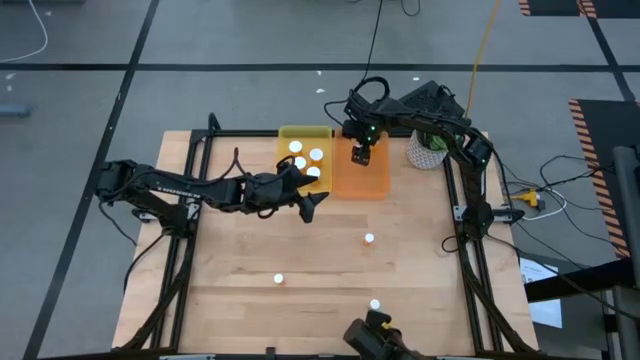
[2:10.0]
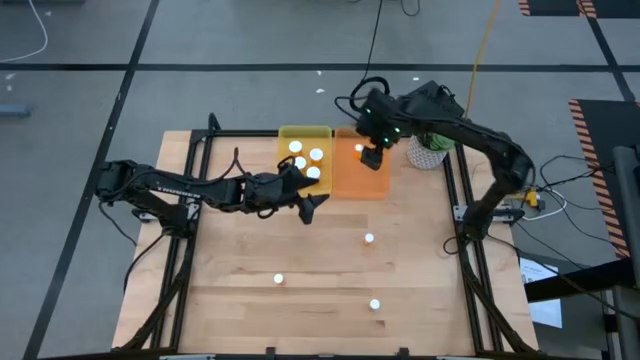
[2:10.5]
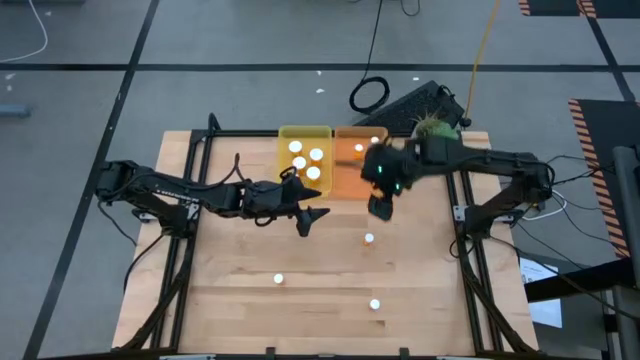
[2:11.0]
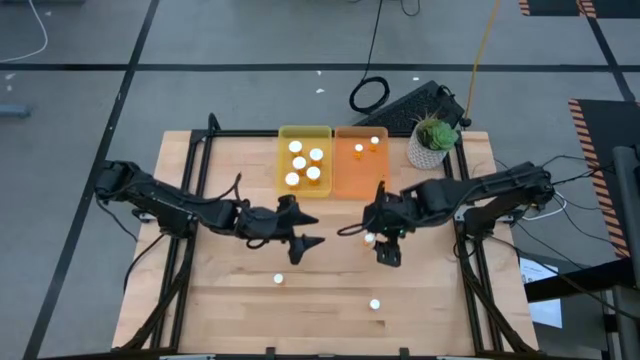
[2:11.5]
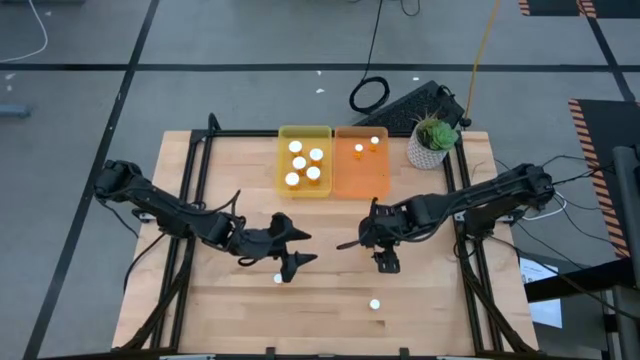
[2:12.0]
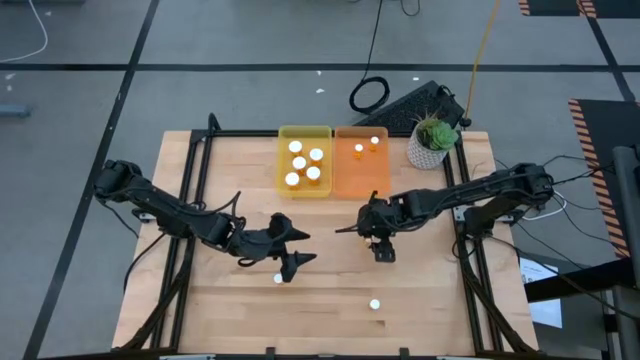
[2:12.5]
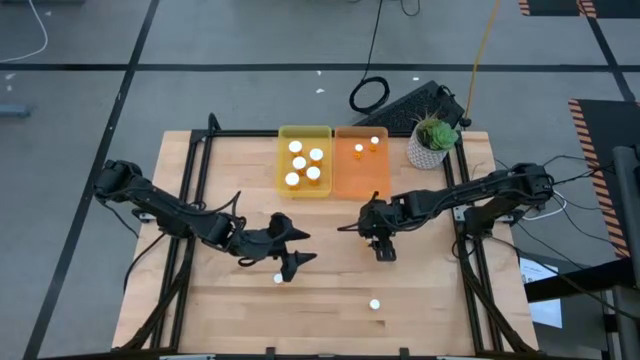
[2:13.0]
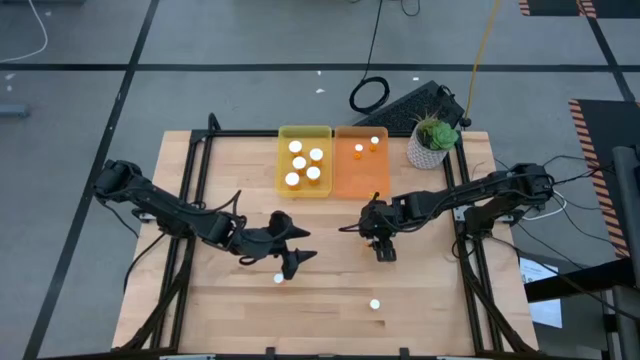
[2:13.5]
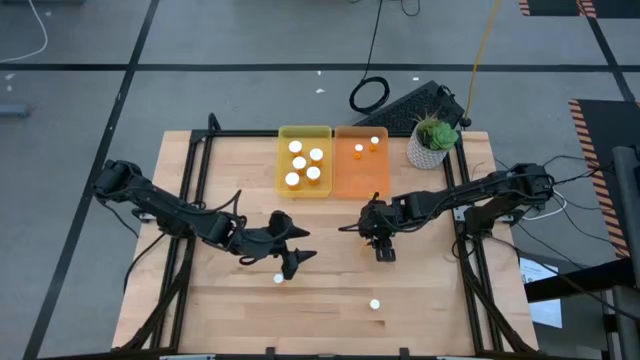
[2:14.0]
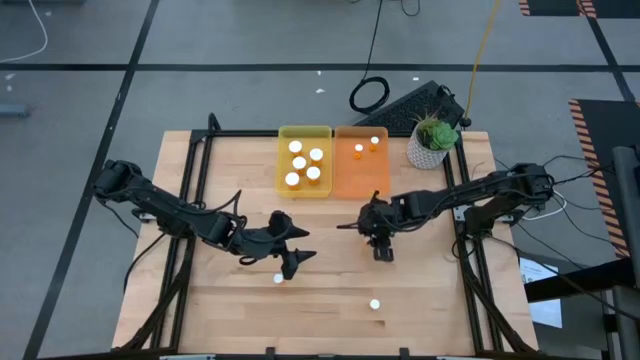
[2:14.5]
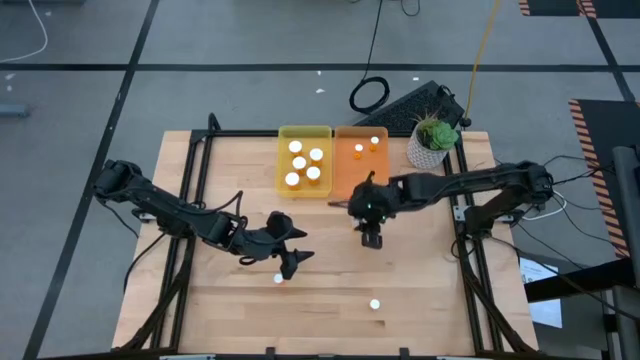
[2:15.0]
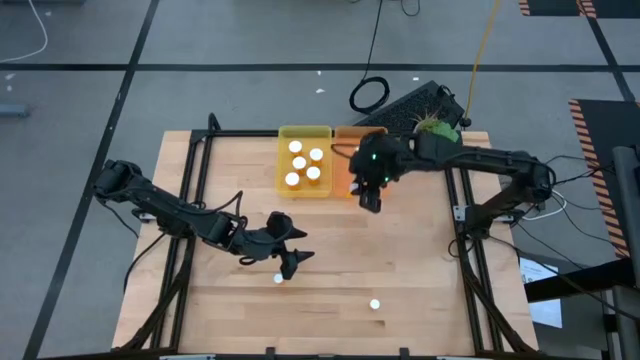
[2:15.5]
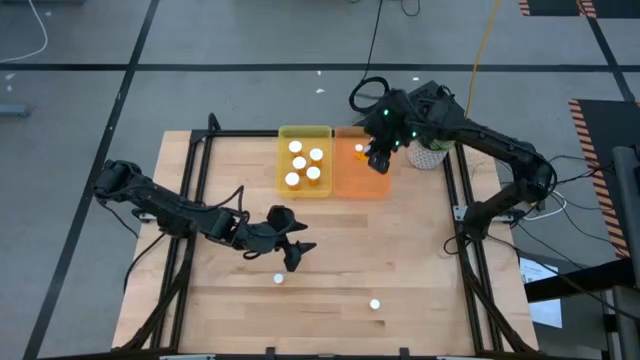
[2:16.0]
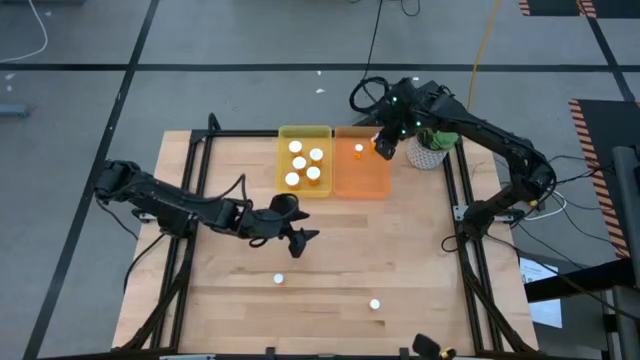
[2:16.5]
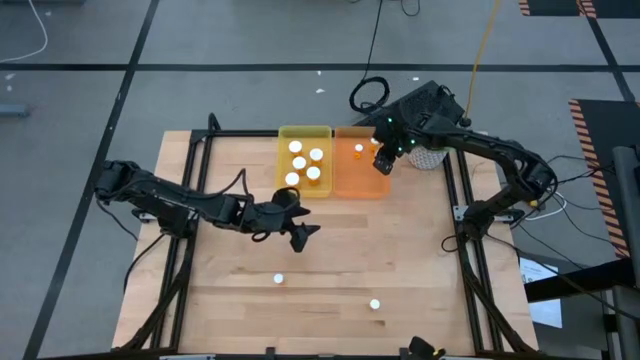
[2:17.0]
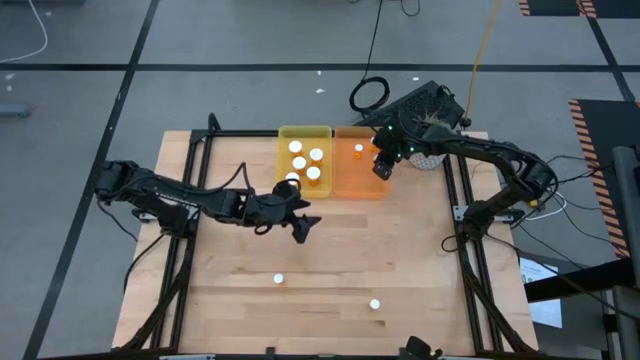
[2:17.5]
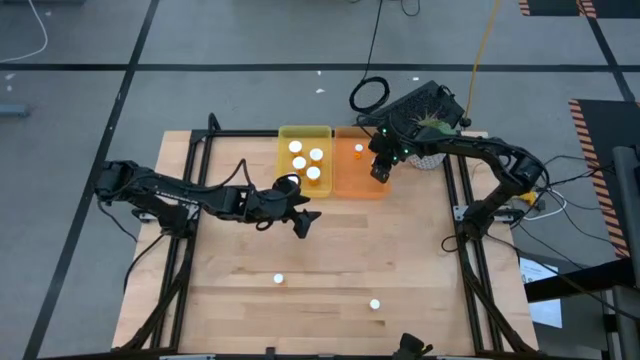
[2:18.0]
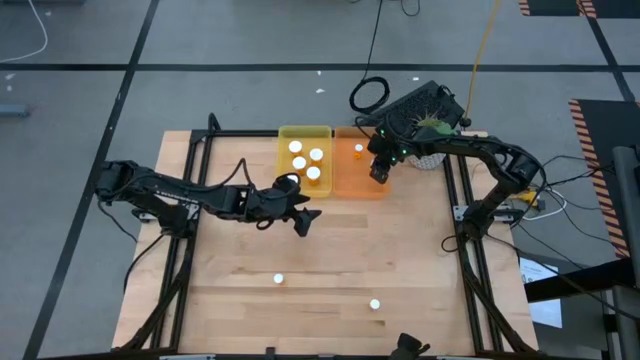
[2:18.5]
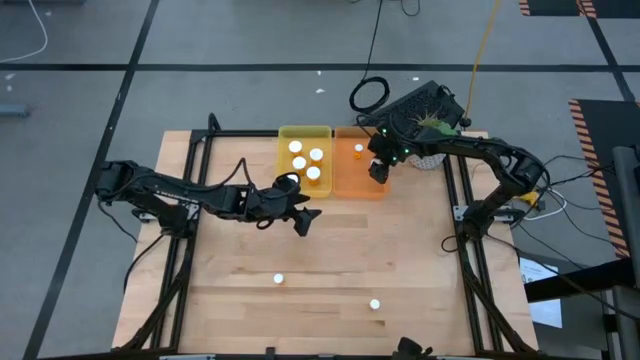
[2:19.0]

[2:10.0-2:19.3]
Task: Pick and place medicine bottles into bin by pill shape (circle, oval)
Put the small orange tablet bottle into the orange bin

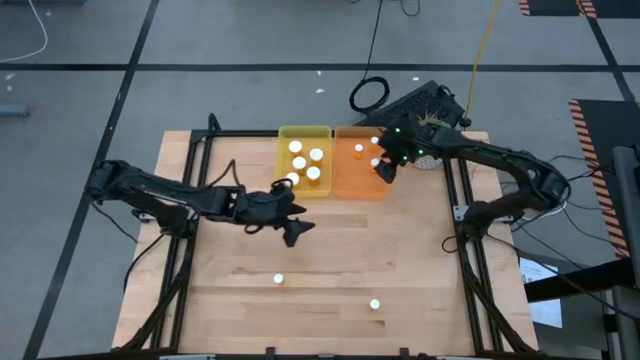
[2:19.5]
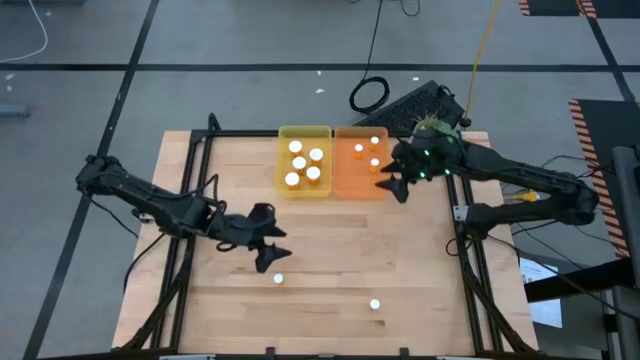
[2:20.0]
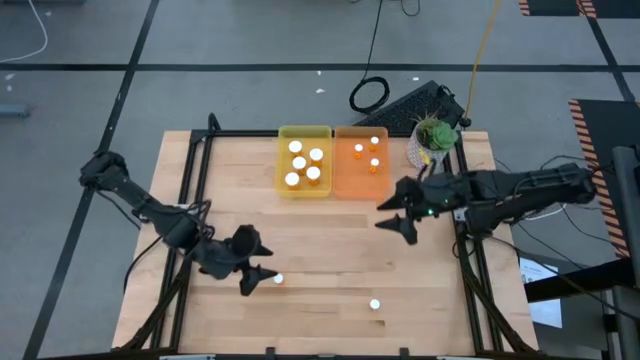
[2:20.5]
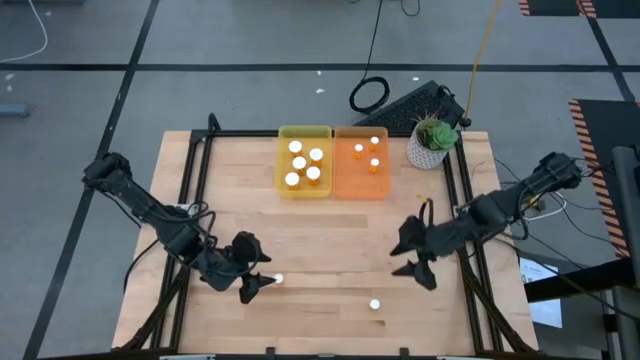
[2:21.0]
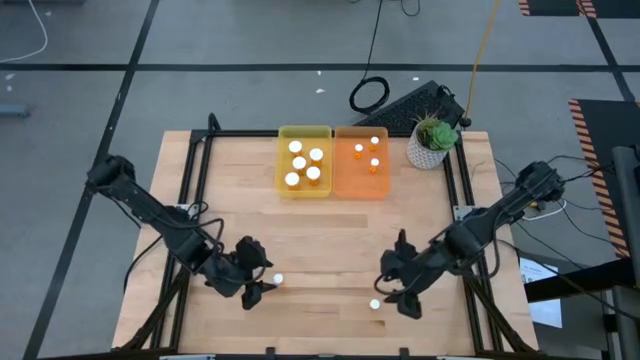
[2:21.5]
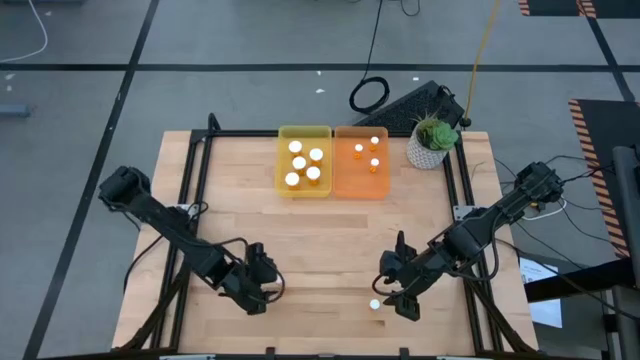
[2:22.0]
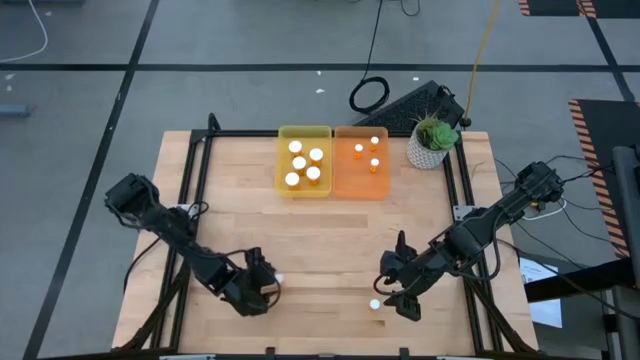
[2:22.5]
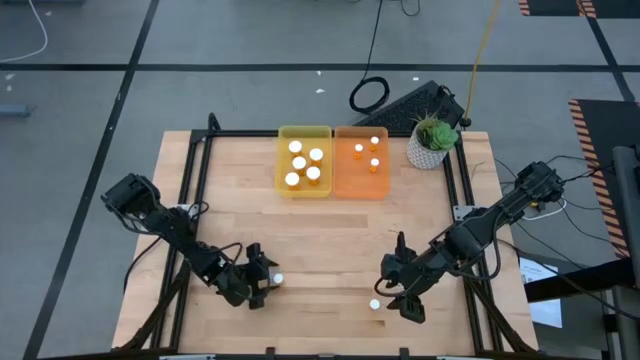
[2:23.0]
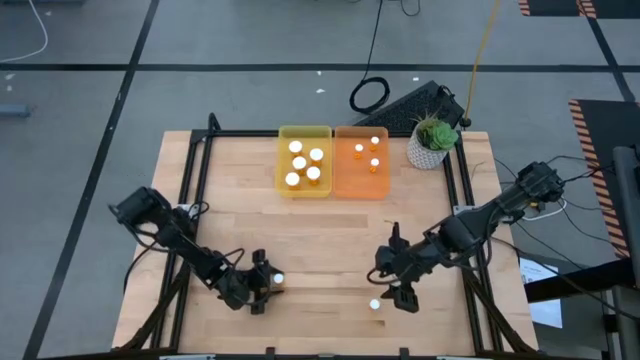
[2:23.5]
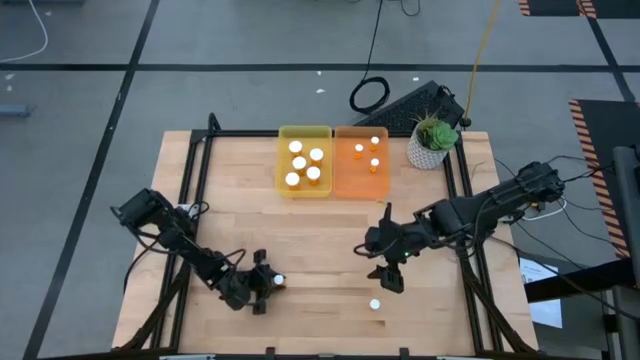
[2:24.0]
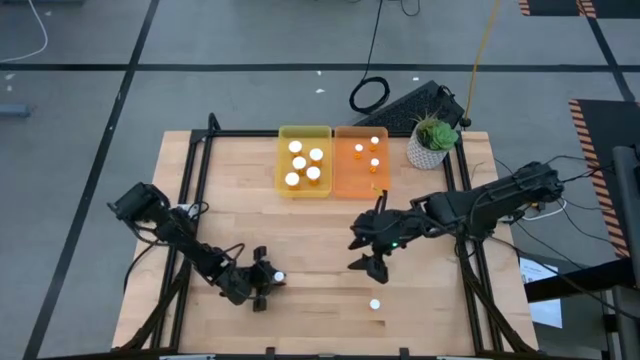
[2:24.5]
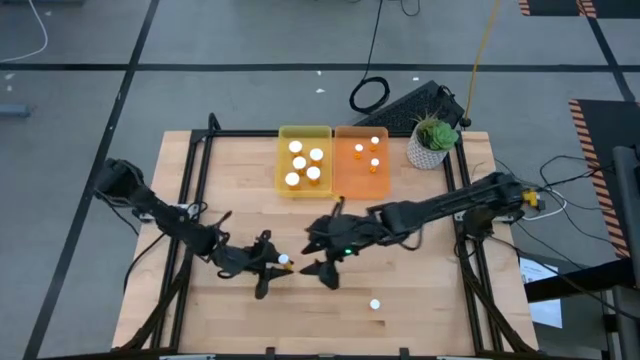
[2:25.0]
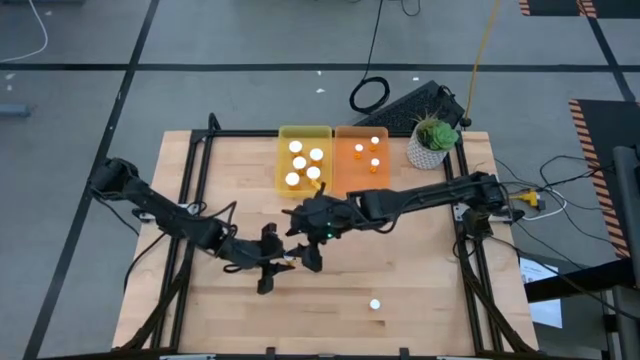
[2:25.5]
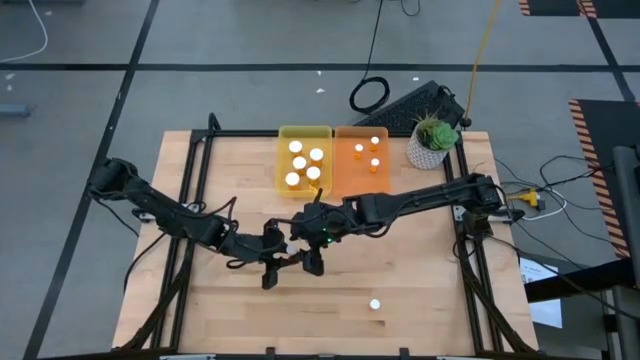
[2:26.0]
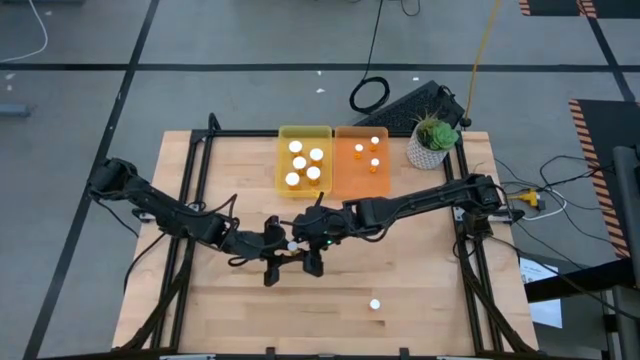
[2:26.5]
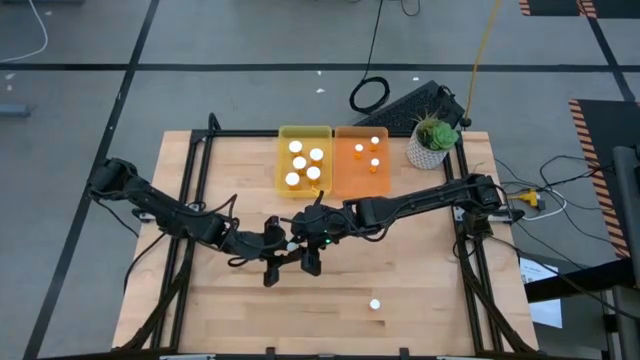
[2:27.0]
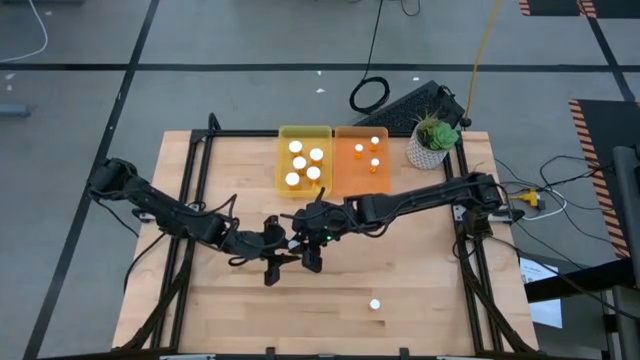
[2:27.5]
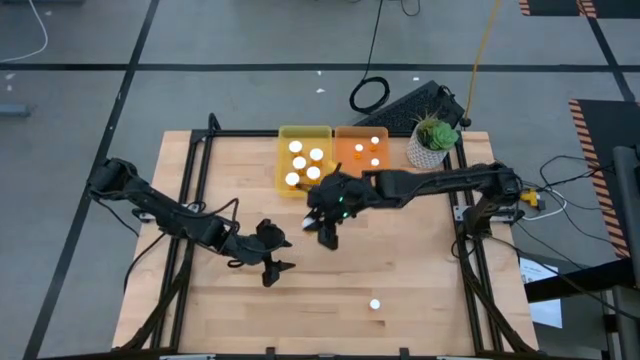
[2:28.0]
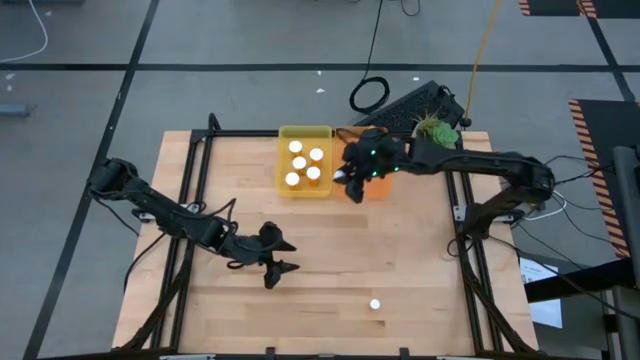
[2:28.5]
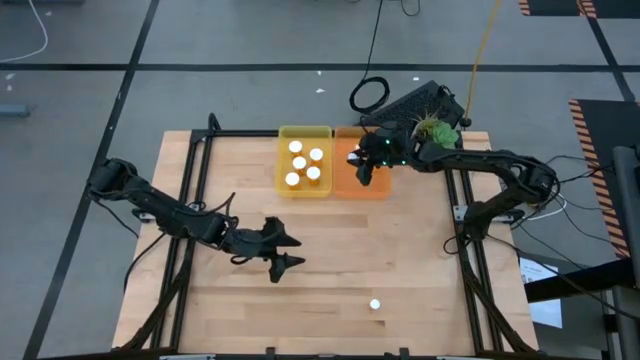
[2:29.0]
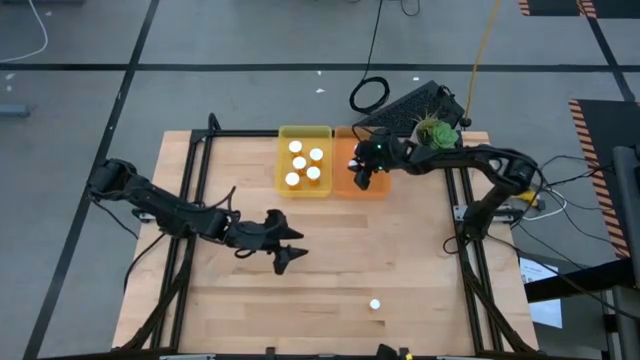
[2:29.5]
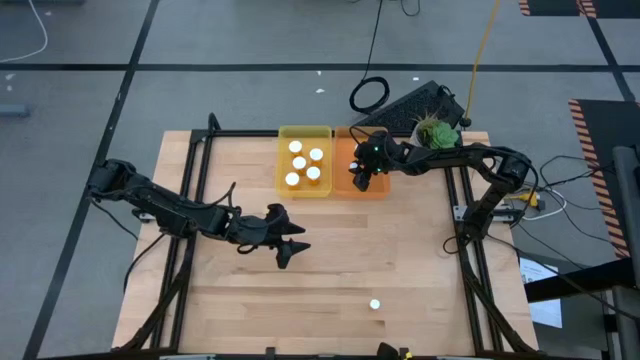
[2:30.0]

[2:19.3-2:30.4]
Put the small orange tablet bottle into the orange bin

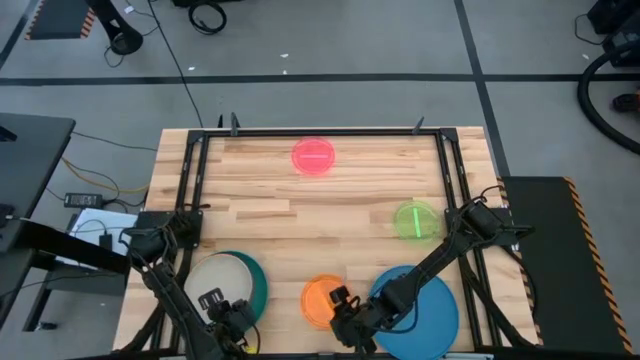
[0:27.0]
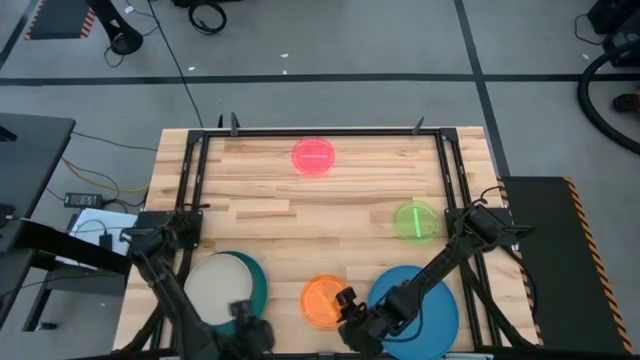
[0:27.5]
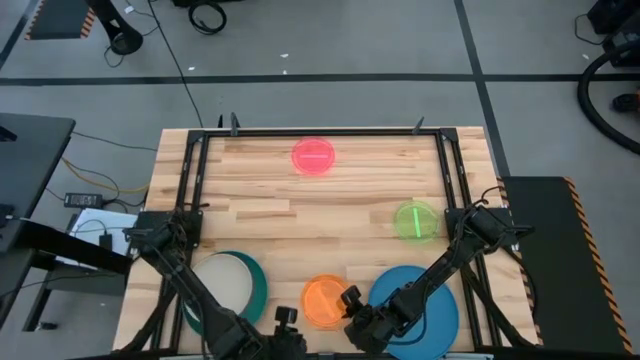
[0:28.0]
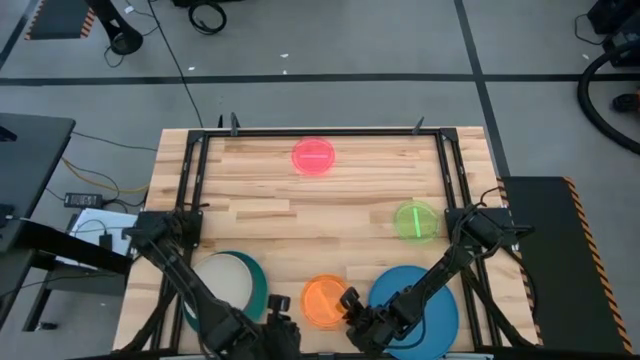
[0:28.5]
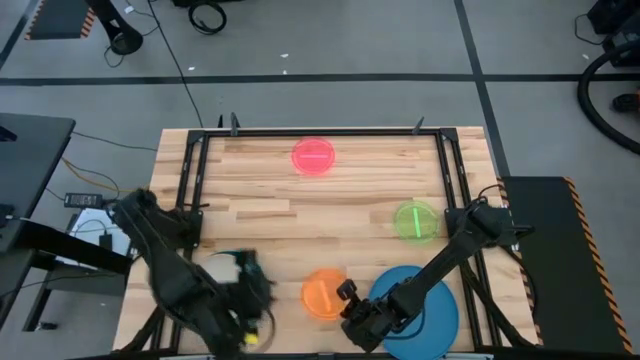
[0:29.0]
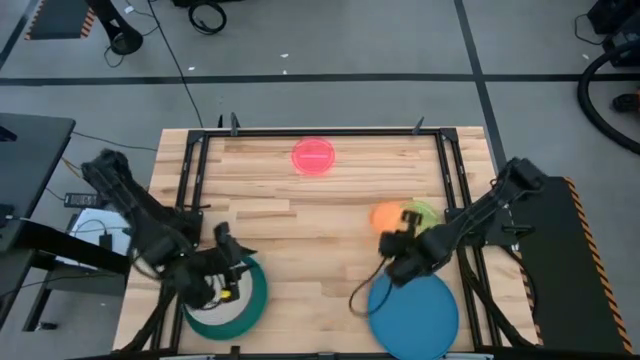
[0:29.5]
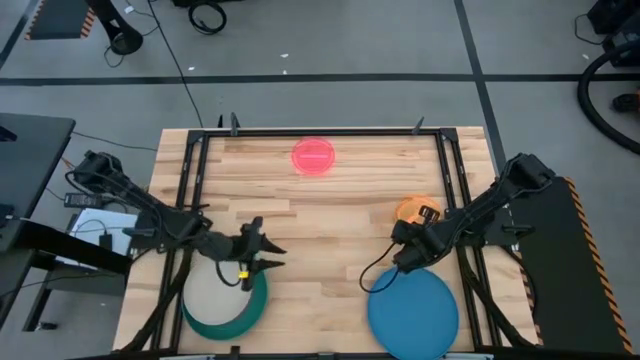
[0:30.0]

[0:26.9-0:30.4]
Task: Stack plastic plates
Stack the orange transparent plate on top of the green transparent plate
